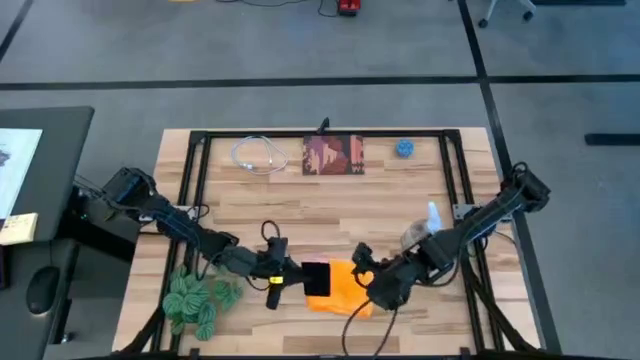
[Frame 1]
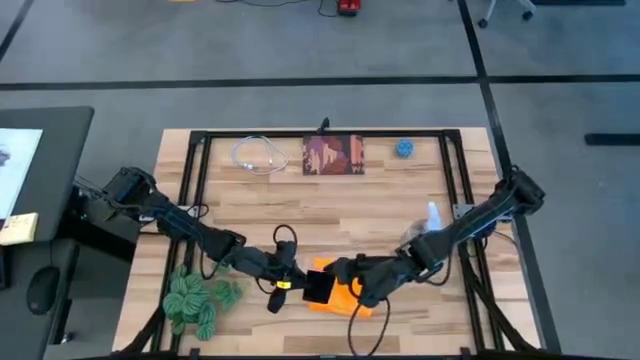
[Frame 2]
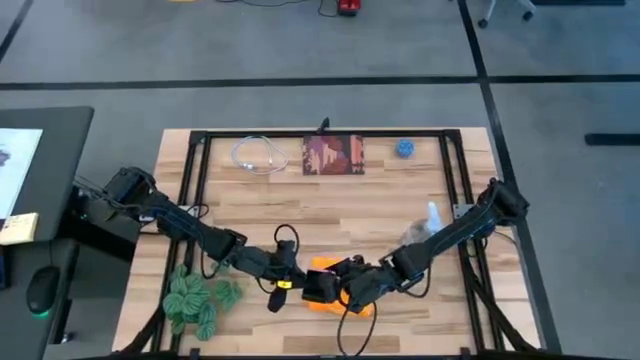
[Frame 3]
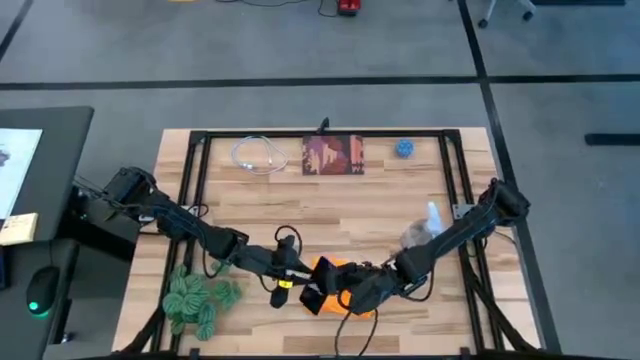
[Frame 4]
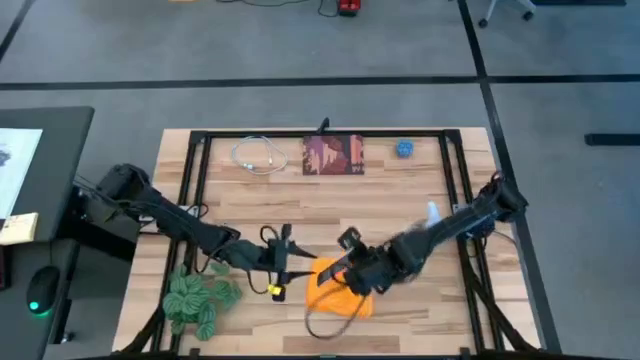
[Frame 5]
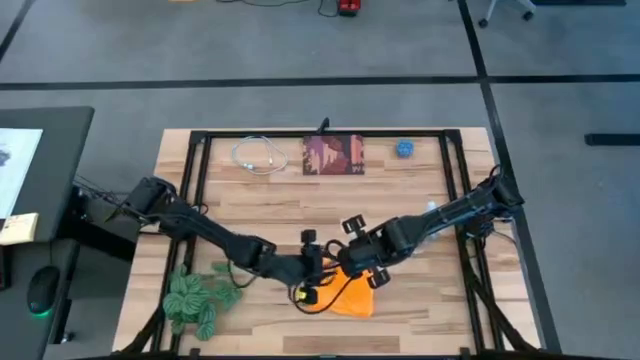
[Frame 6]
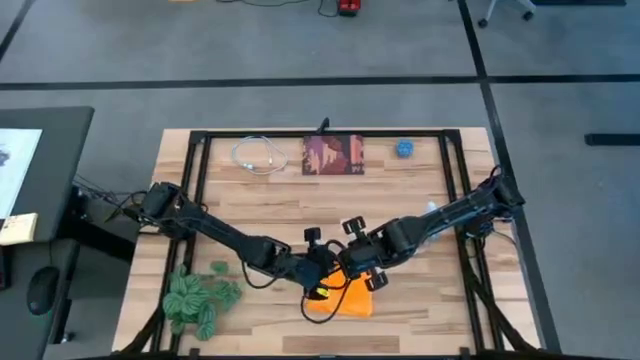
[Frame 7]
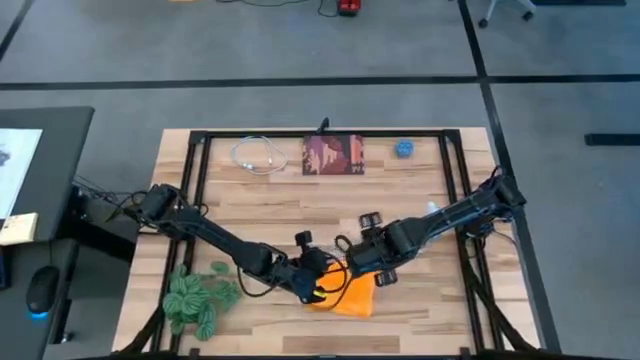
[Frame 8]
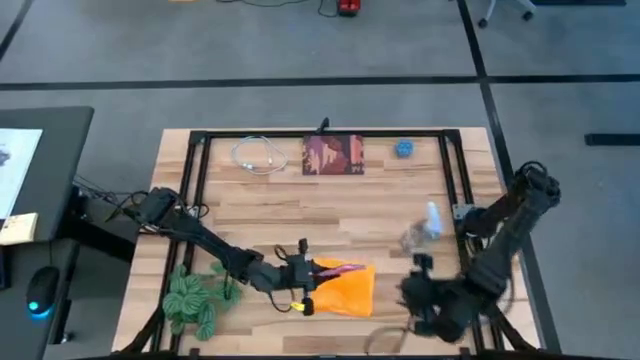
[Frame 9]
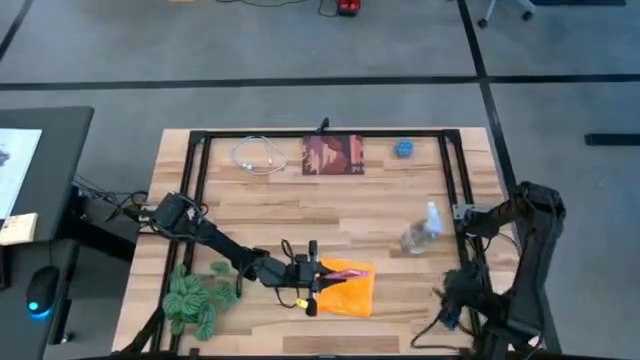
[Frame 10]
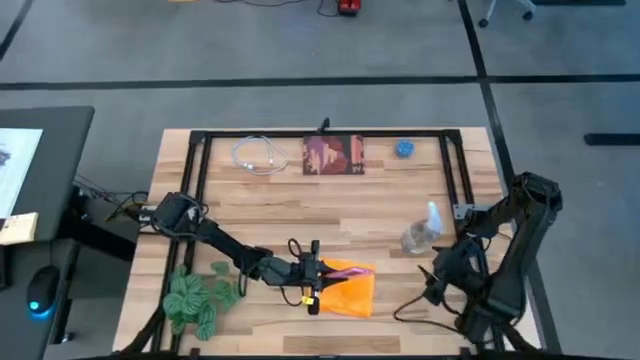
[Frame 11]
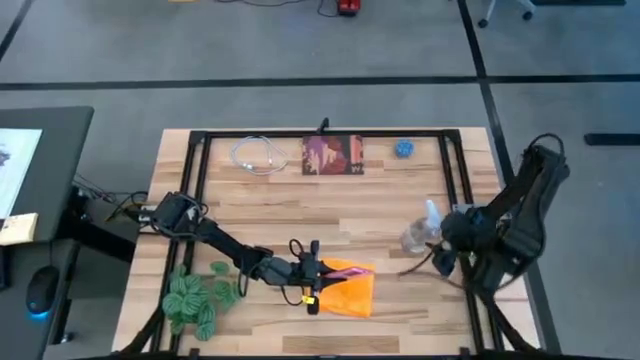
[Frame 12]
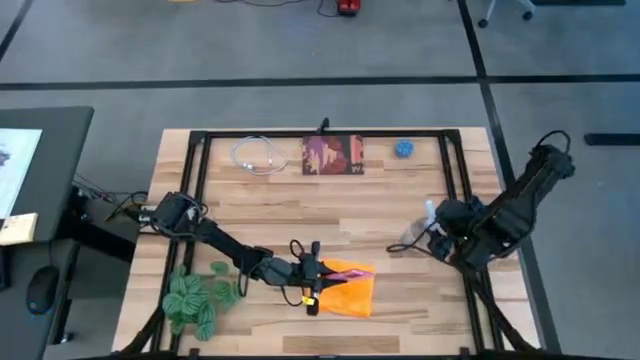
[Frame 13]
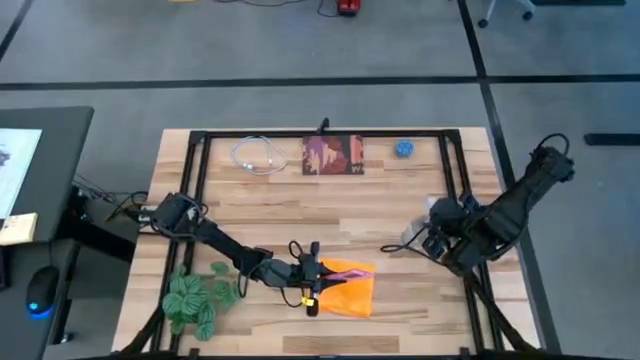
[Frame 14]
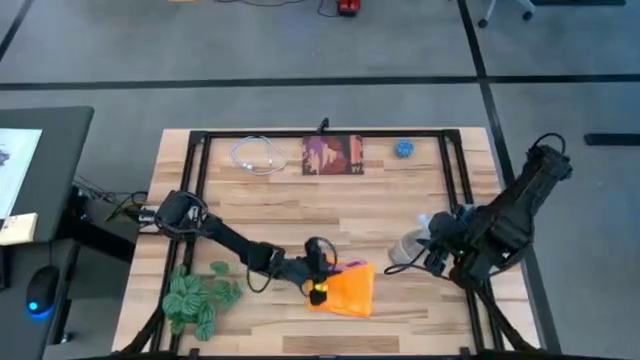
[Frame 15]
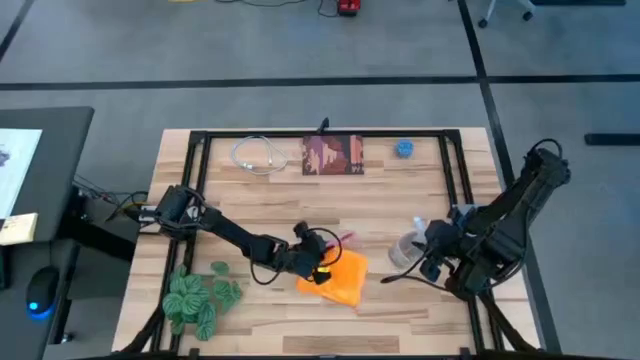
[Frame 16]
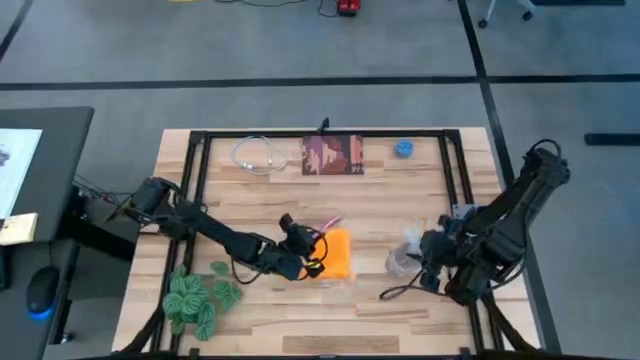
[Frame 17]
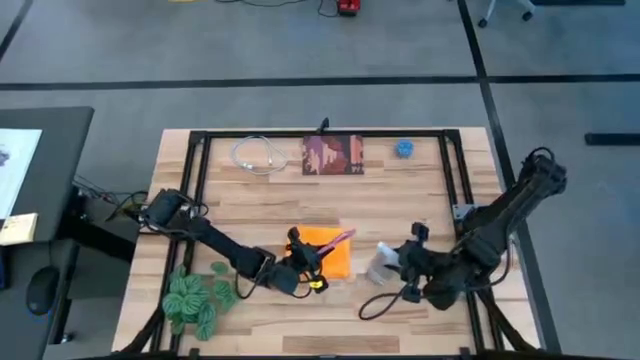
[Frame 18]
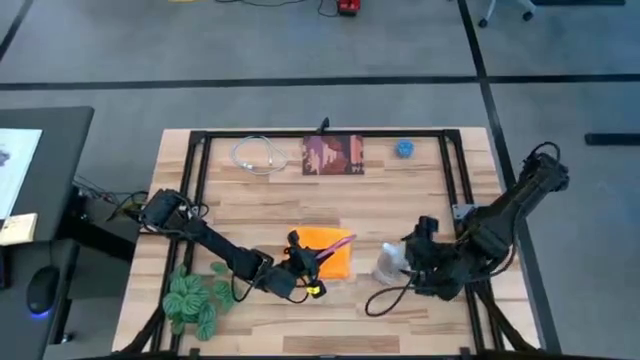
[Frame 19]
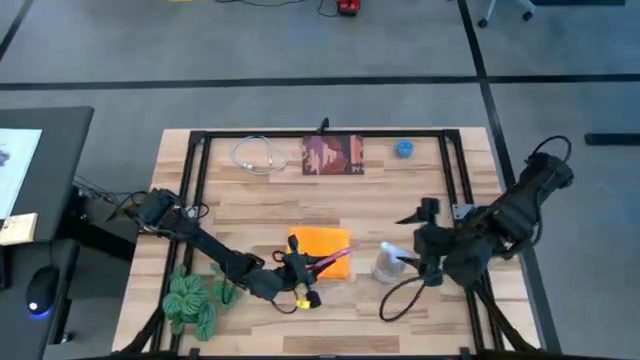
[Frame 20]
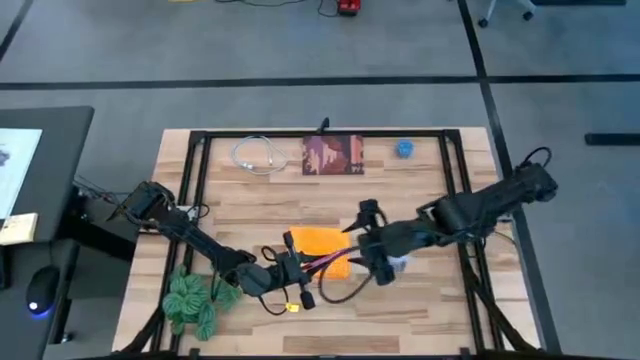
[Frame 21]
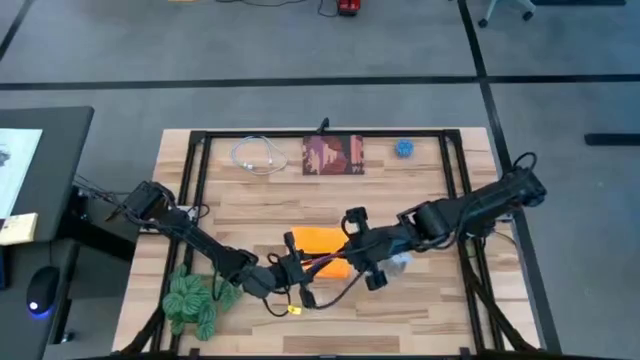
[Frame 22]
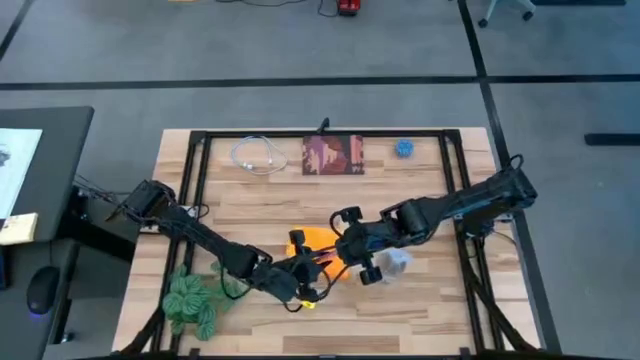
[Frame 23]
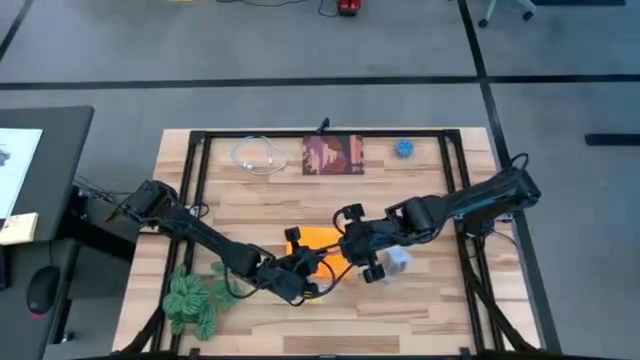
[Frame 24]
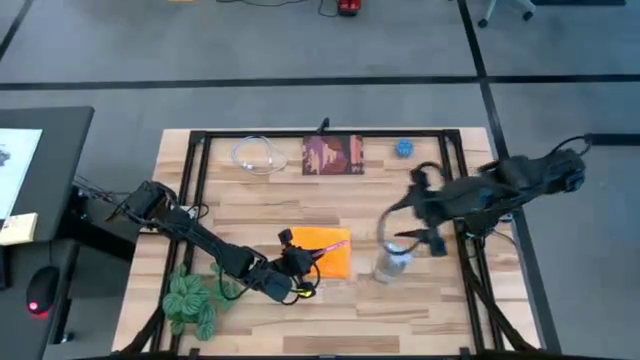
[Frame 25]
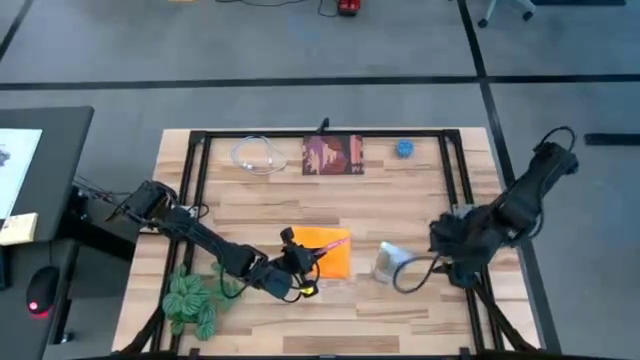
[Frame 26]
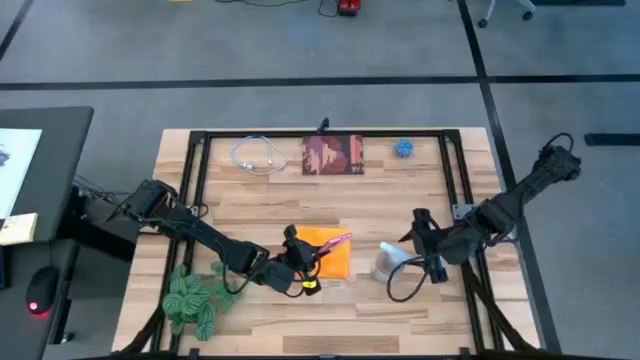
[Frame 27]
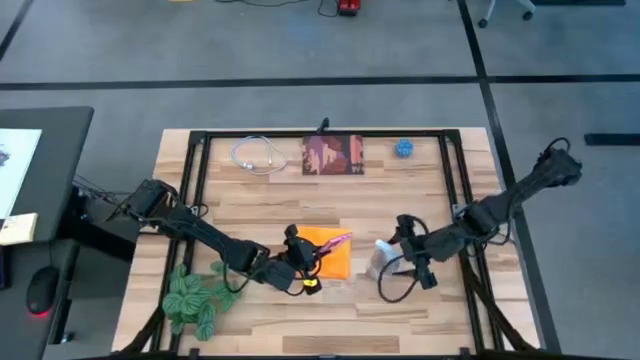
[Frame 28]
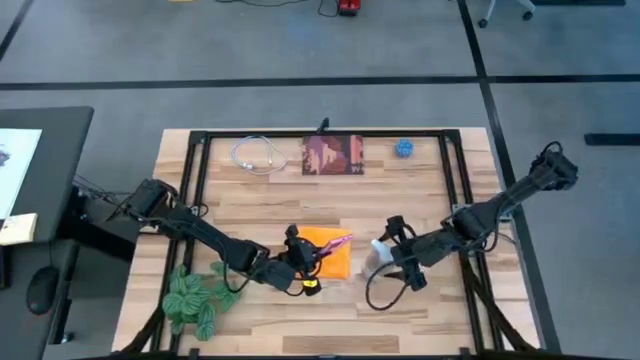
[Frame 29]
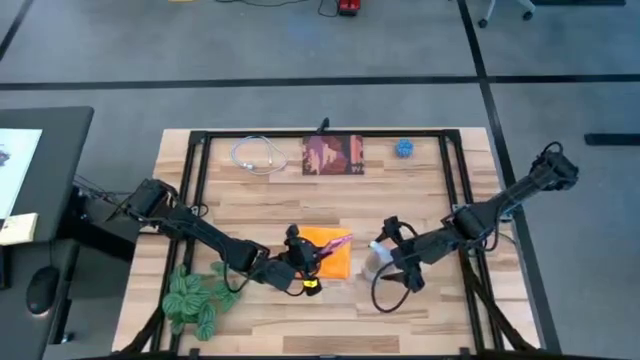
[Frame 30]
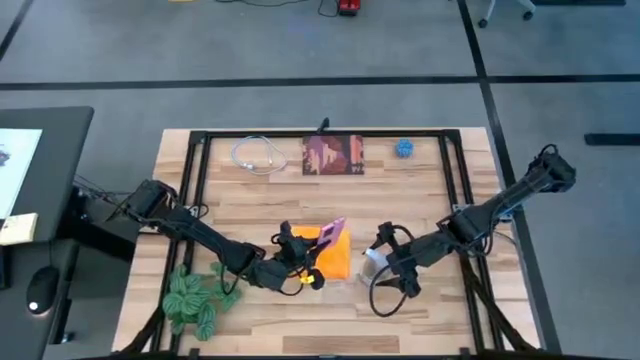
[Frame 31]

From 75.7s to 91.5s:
Task: Apply microfiber cloth
Spray the back of the pink cellphone with the spray bottle
